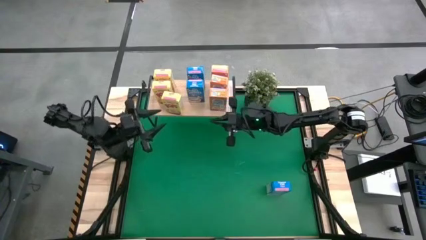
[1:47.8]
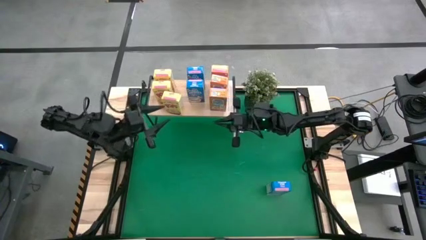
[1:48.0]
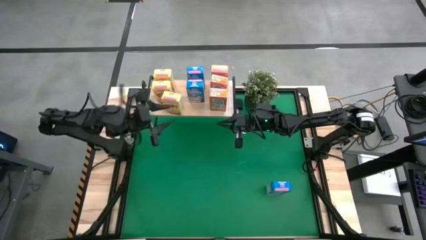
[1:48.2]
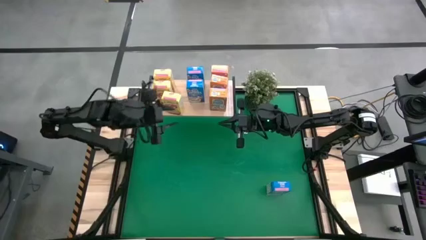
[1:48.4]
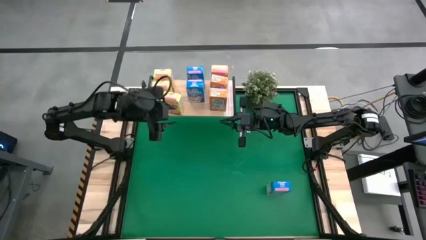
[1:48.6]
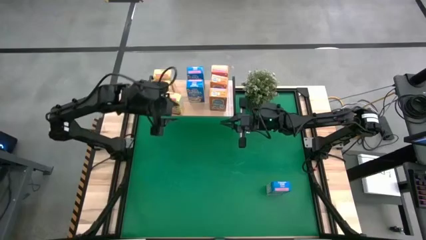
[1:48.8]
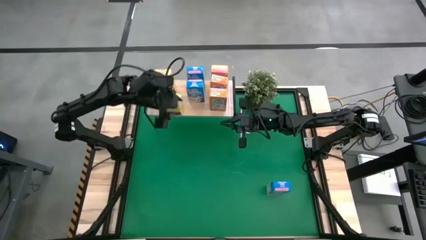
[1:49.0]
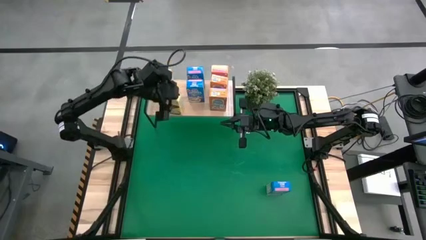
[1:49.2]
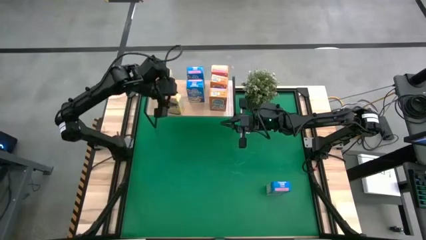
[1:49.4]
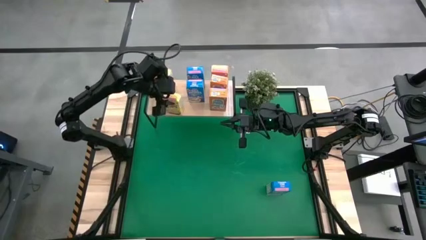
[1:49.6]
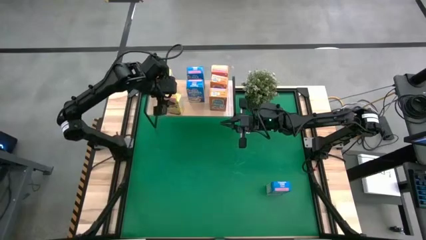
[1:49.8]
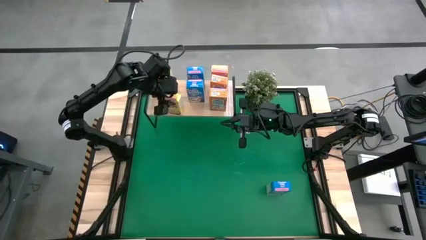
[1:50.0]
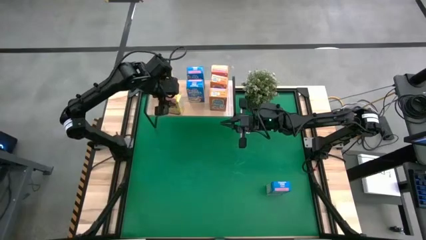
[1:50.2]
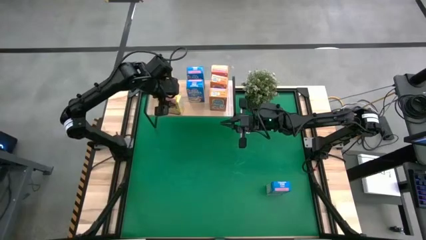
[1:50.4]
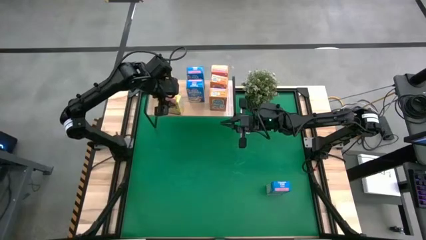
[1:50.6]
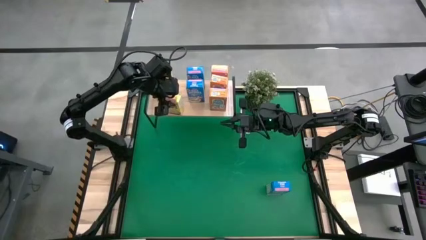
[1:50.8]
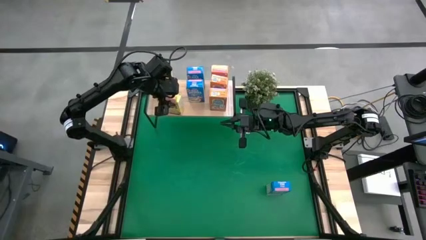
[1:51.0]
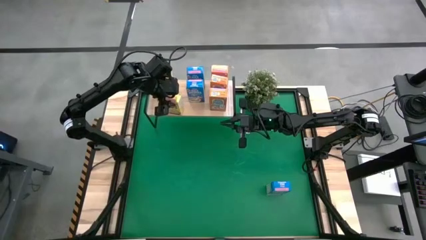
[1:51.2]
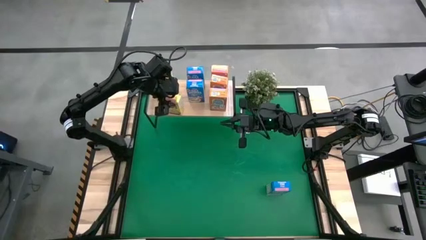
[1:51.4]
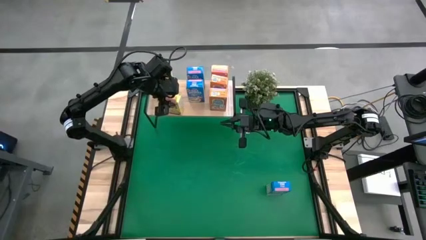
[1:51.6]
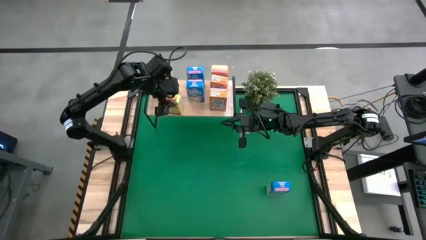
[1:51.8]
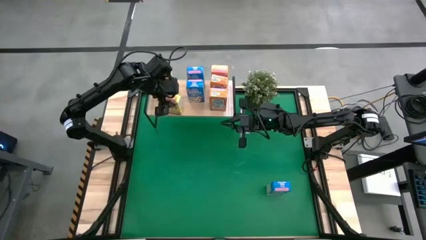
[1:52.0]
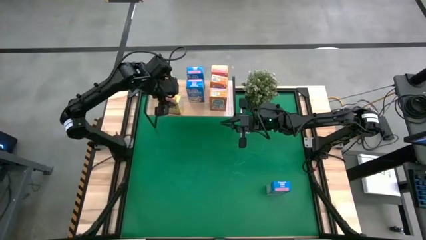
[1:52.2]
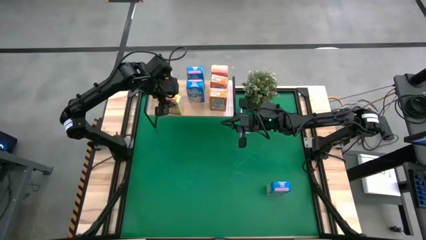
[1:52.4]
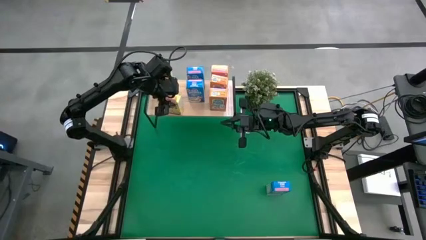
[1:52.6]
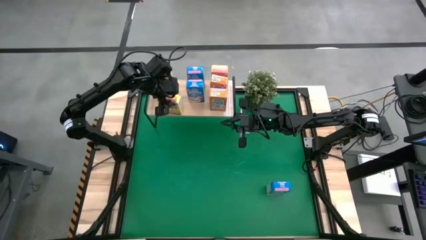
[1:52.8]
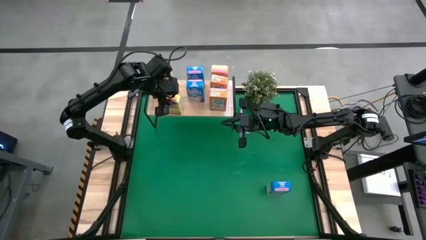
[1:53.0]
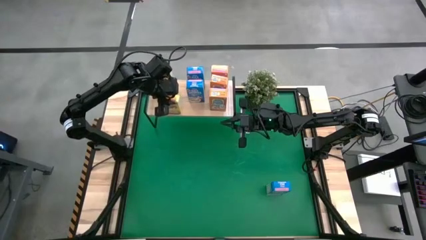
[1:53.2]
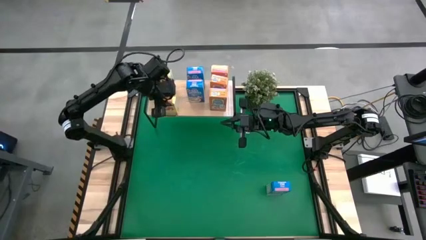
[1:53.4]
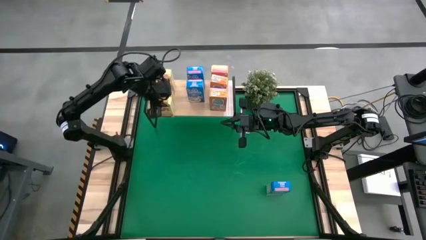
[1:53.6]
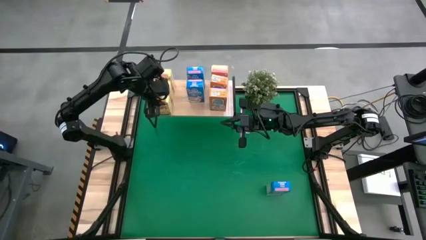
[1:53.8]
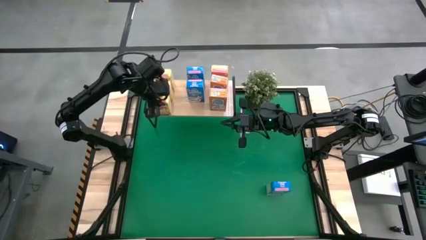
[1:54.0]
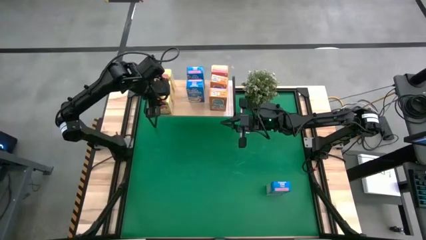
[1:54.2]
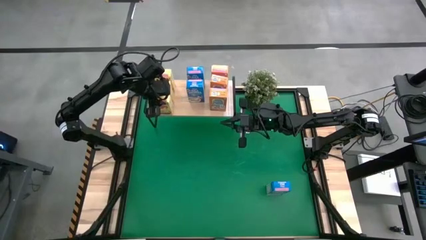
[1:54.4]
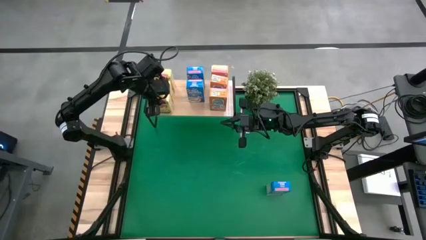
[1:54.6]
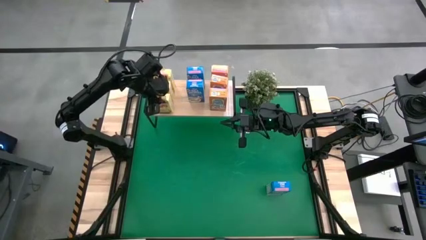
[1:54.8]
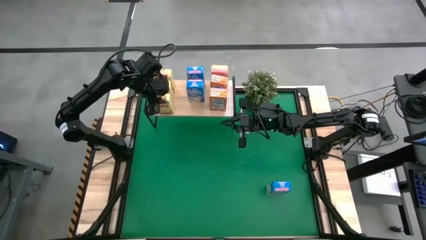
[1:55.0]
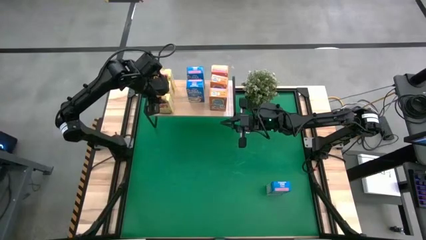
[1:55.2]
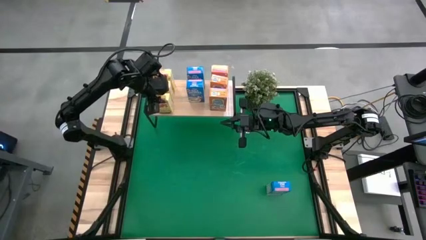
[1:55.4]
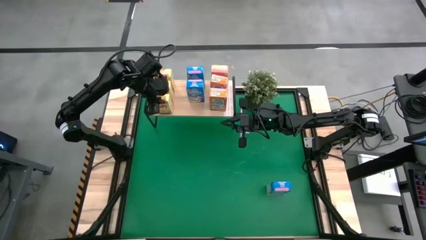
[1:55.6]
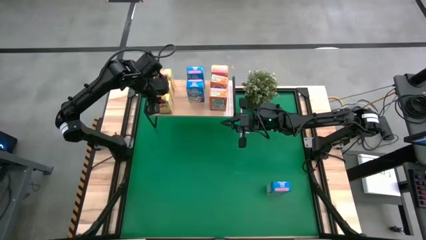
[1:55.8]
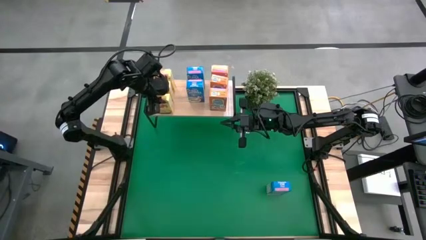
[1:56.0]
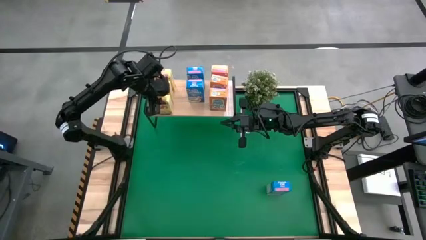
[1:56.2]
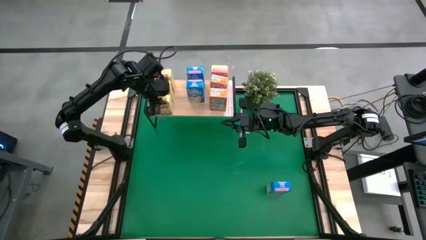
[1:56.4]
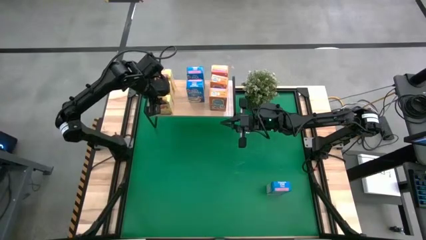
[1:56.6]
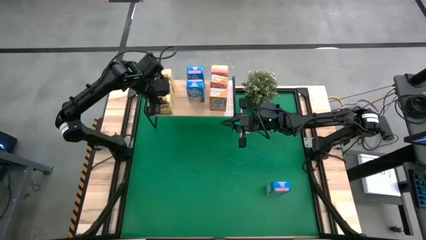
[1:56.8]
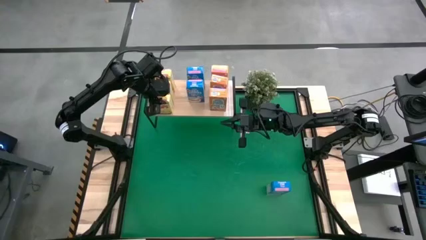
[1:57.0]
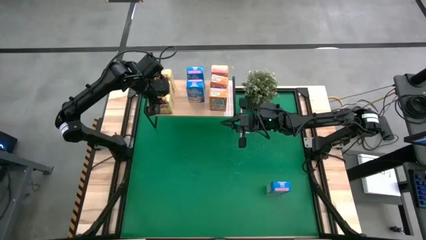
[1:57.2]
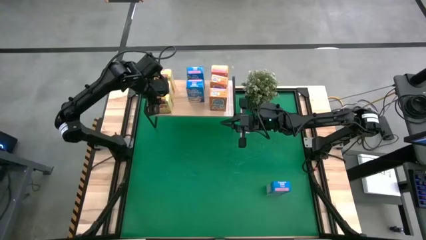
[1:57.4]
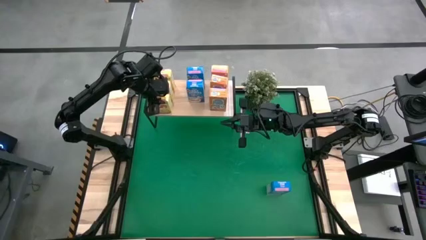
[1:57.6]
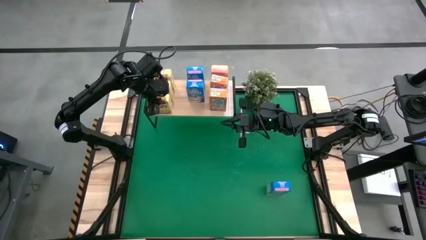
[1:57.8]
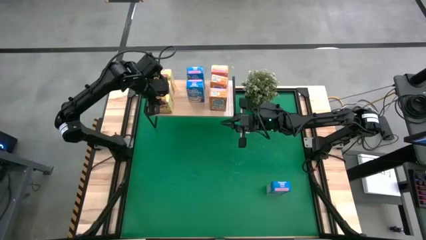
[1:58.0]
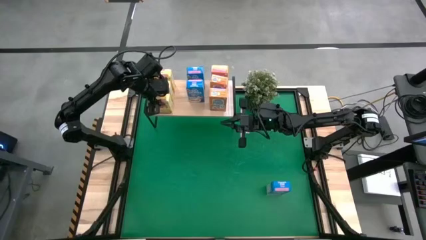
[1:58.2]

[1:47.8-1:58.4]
Task: Stack cereal on shelf
Put the yellow cereal box on the shelf

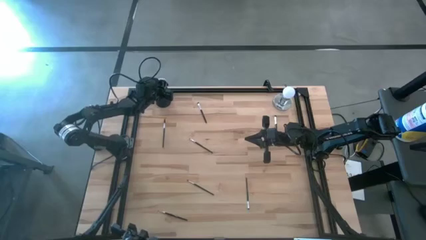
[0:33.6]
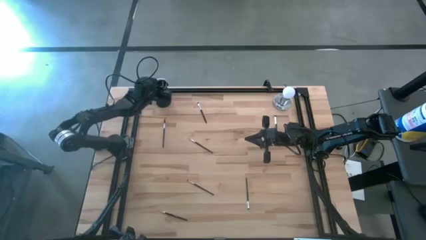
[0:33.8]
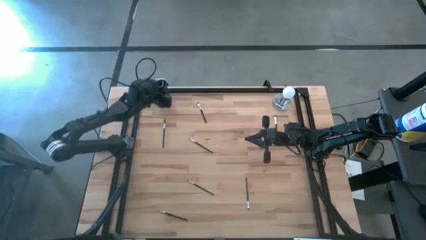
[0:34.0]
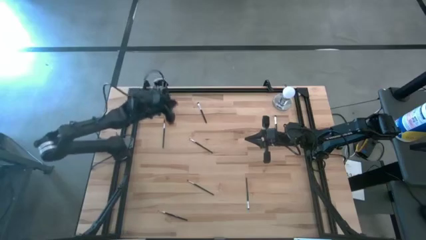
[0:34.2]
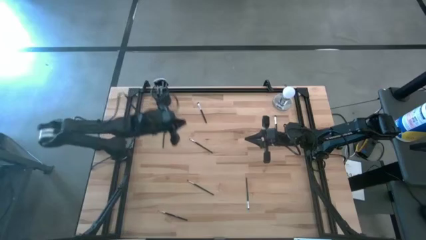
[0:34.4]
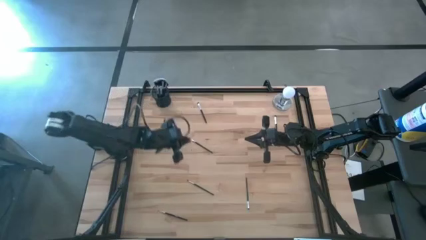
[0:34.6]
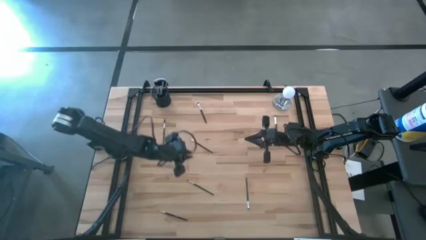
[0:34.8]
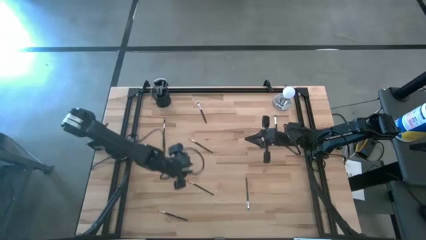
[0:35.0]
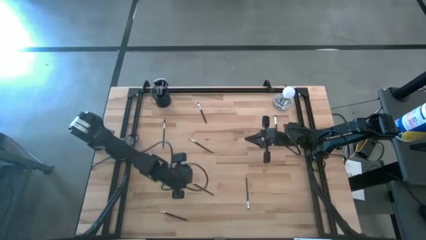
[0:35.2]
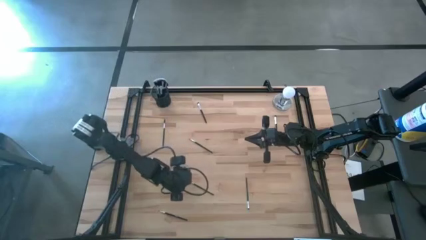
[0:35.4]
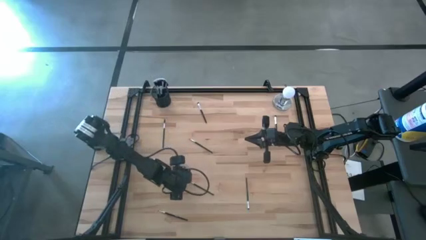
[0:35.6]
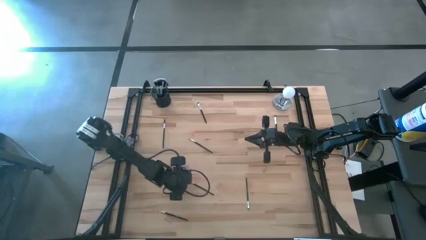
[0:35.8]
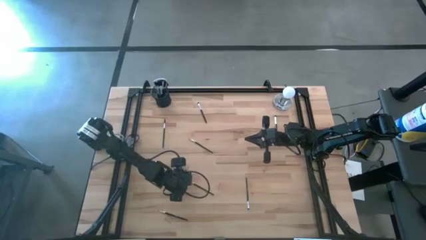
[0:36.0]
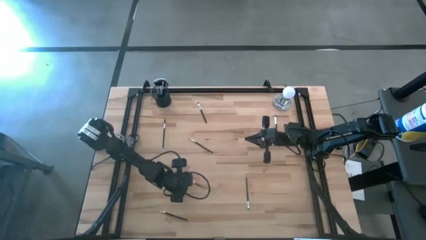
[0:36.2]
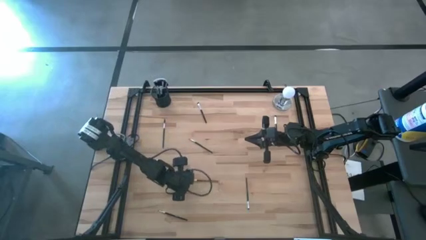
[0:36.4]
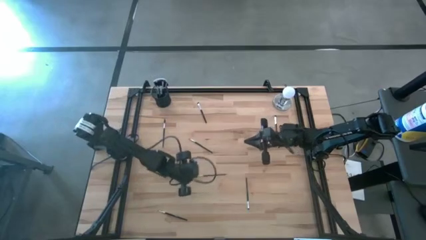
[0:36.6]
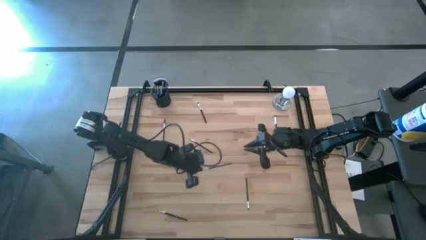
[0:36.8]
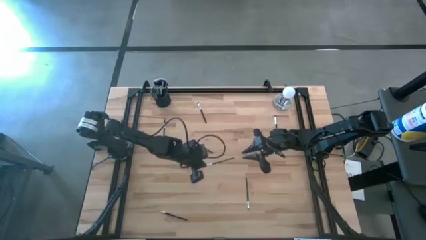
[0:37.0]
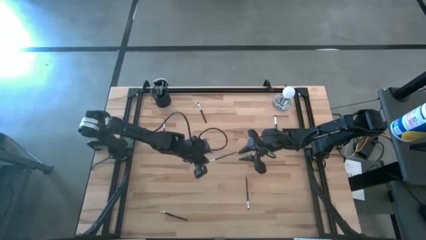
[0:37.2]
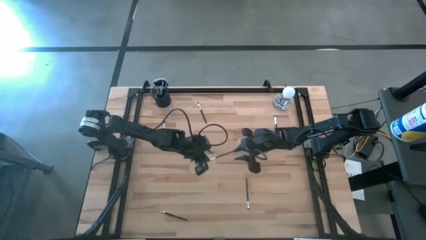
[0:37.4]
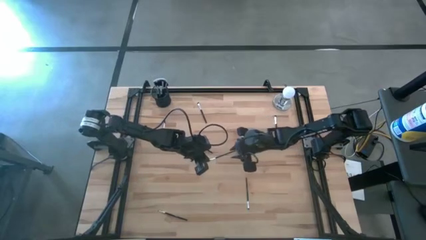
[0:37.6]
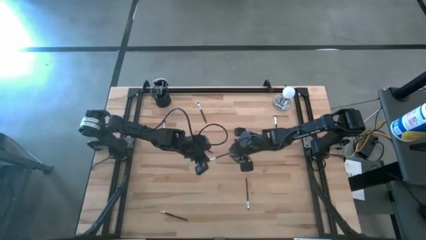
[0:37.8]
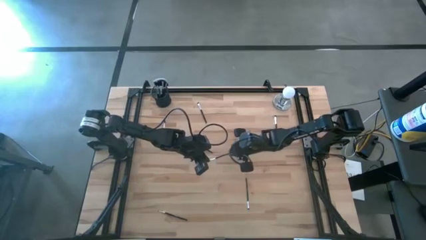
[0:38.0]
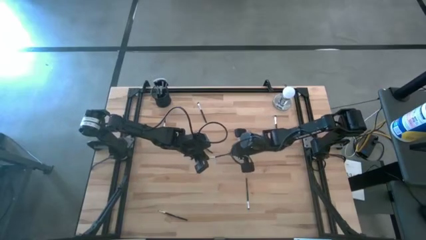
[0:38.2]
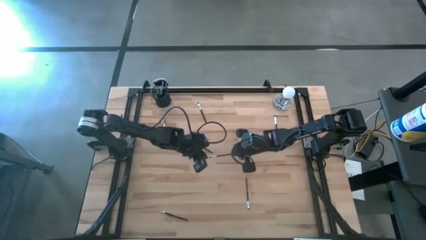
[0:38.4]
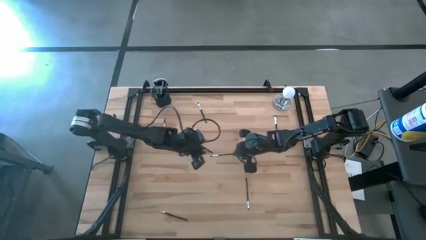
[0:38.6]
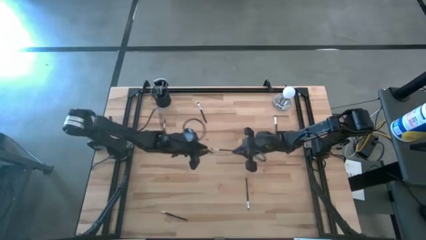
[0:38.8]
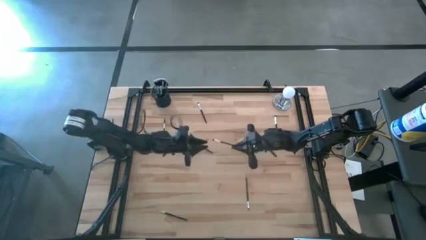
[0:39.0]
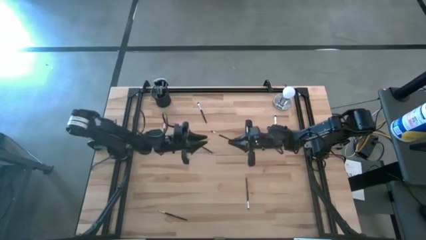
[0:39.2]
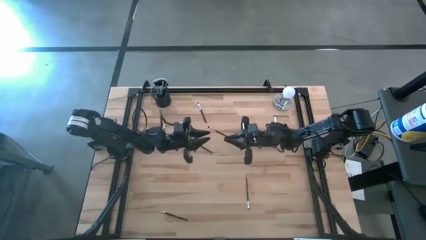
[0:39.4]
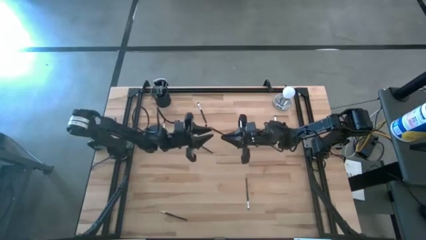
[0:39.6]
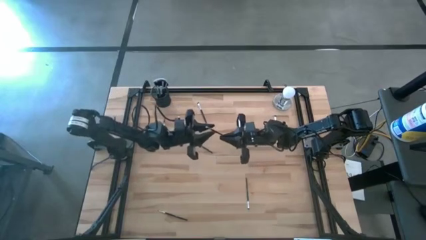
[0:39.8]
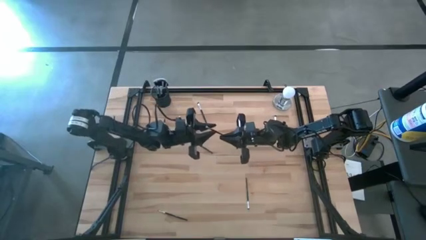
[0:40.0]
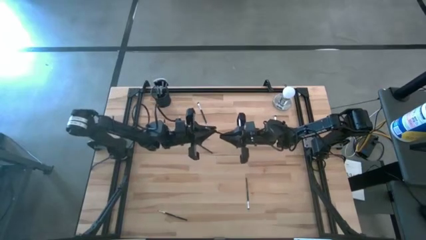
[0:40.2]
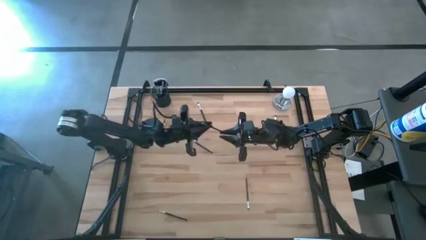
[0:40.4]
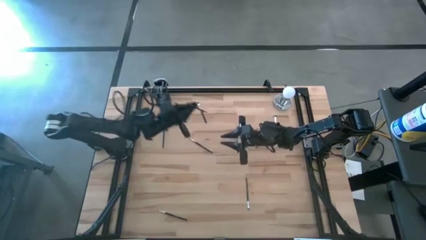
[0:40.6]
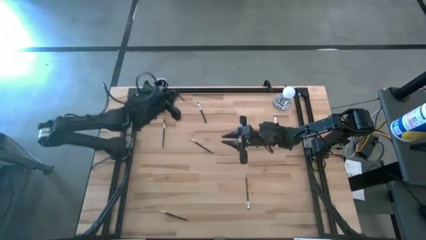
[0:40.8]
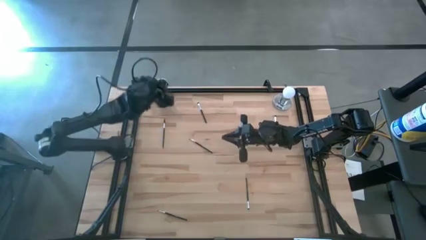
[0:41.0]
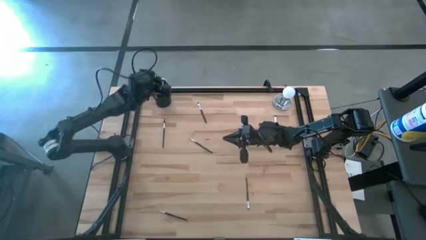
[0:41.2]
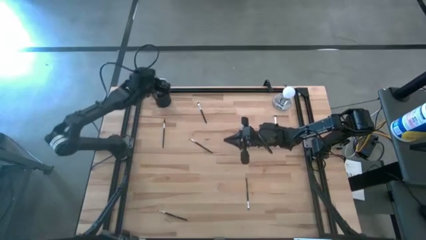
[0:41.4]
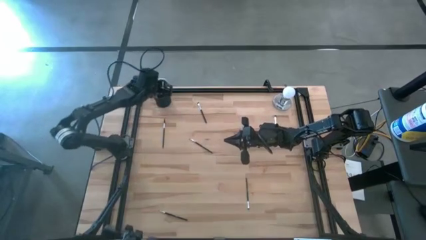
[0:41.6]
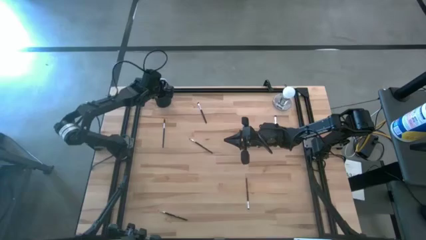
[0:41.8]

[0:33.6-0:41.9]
Task: Put items in baskets/containers
Put the eyeshadow brush into the pen holder
